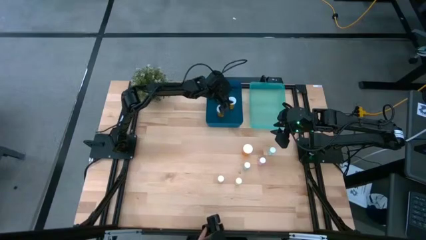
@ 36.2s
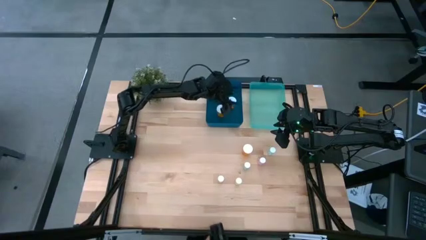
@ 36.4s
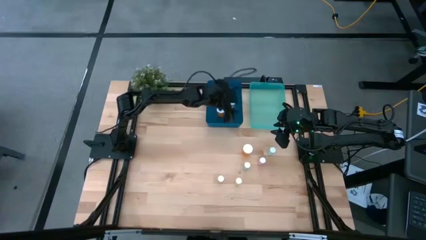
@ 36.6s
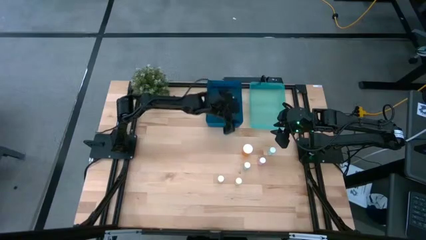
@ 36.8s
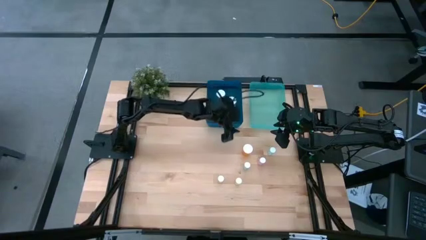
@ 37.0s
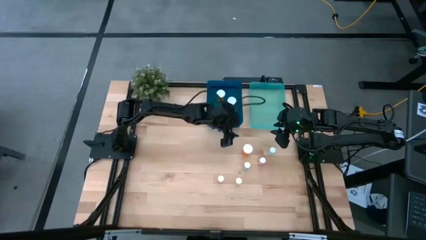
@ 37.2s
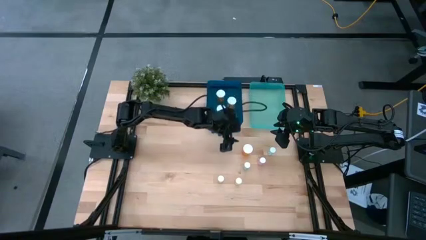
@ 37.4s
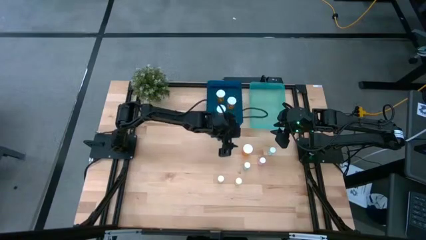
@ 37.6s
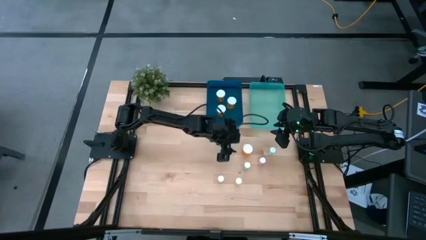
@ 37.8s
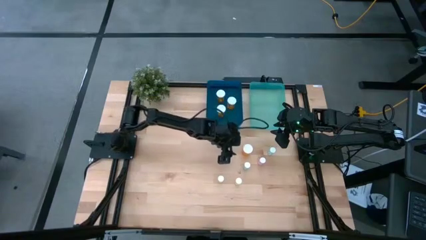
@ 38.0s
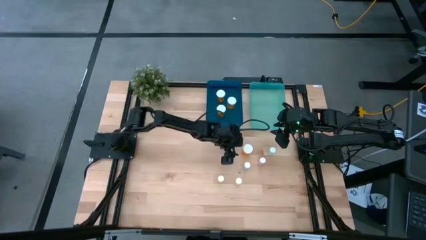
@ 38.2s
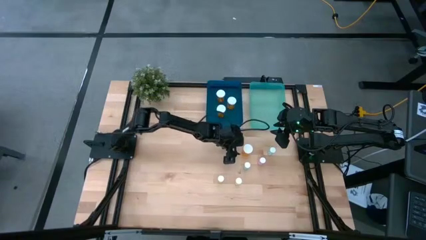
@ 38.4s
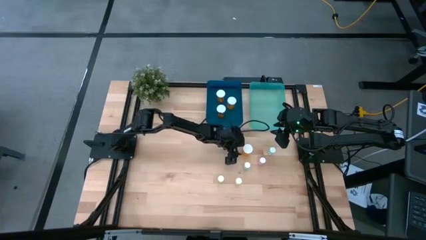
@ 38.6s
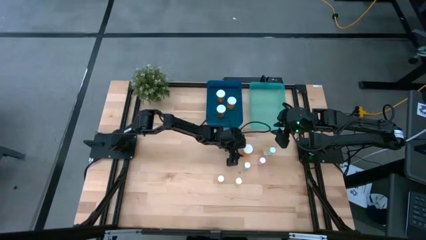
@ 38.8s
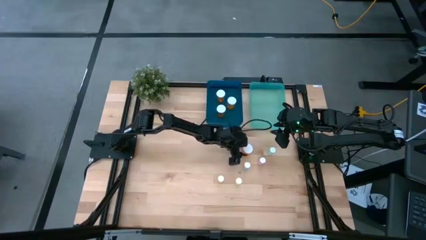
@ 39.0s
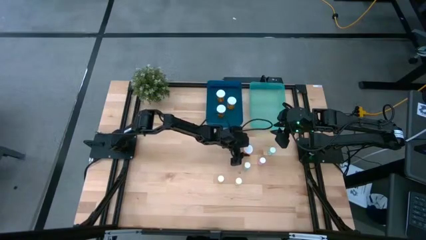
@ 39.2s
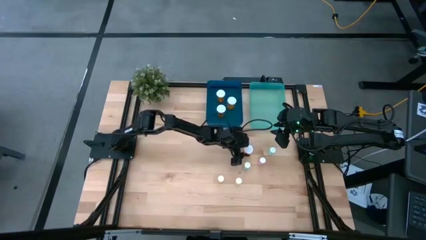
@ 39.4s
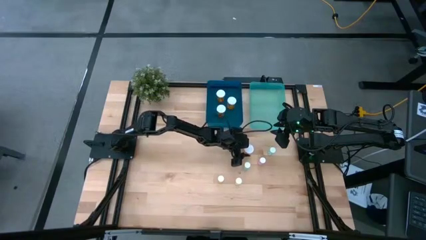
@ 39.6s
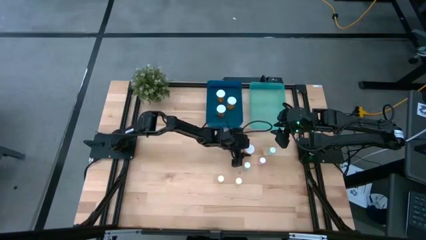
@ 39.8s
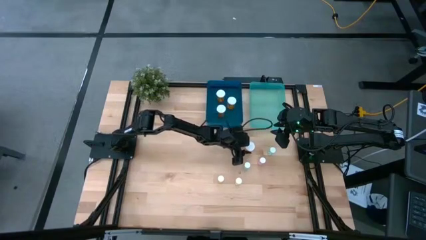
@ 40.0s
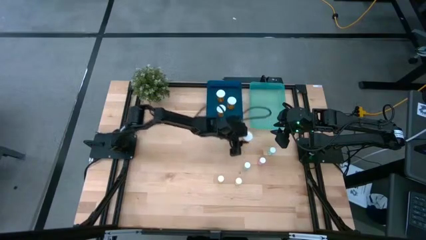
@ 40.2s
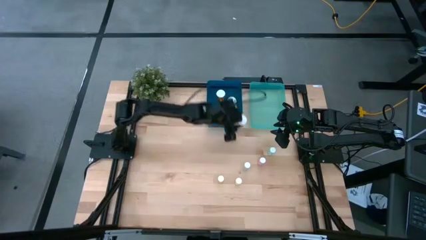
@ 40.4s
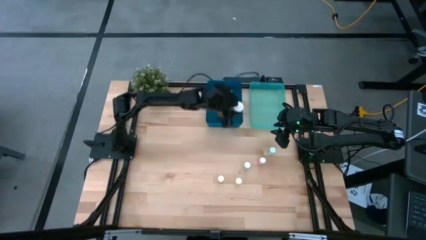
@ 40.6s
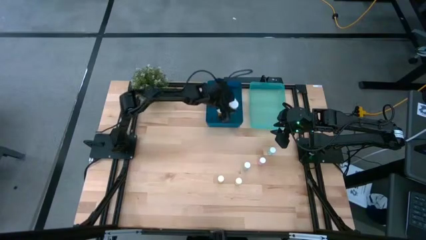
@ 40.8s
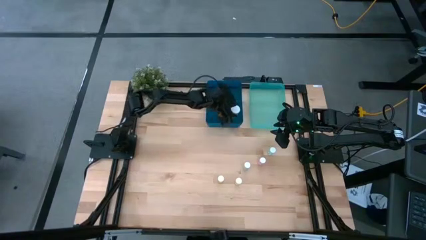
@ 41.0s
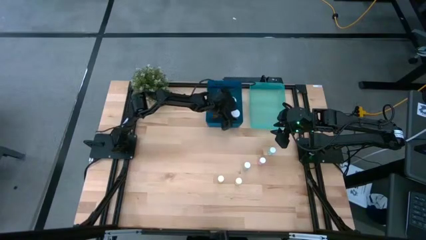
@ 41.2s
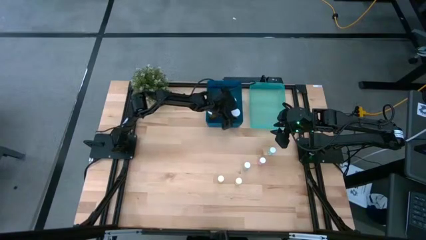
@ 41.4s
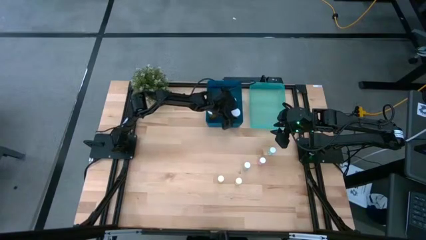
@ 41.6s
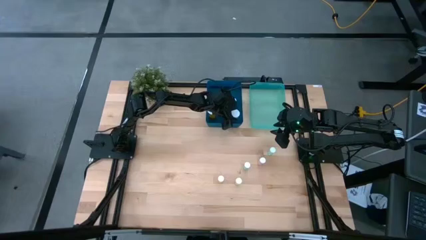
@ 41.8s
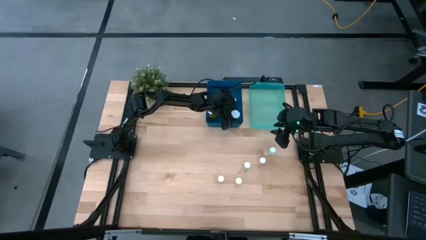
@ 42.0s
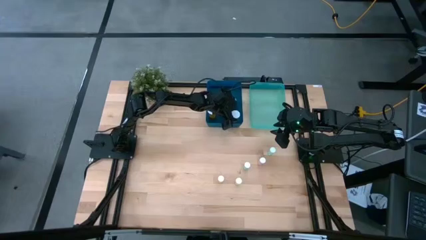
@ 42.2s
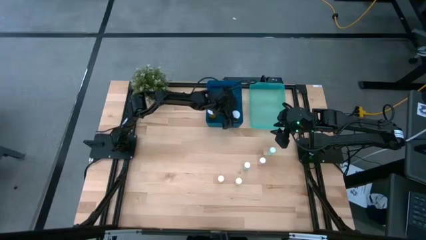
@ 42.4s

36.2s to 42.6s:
Task: Pick and place medicine bottles into bin by pill shape (circle, oval)
Put the large orange medicine bottle into the blue bin

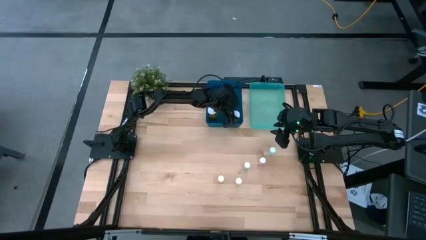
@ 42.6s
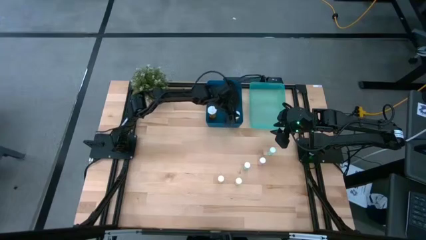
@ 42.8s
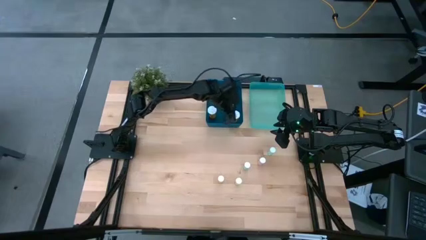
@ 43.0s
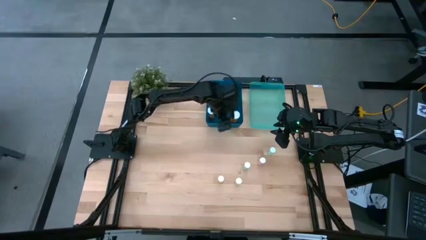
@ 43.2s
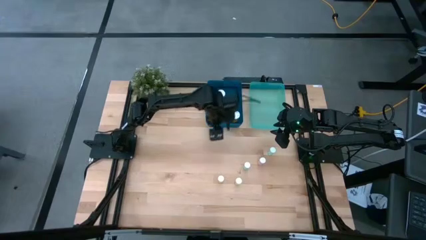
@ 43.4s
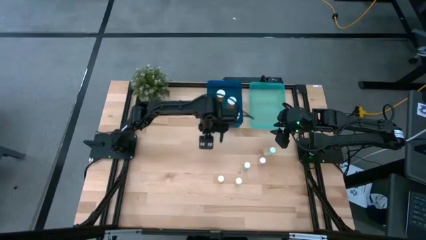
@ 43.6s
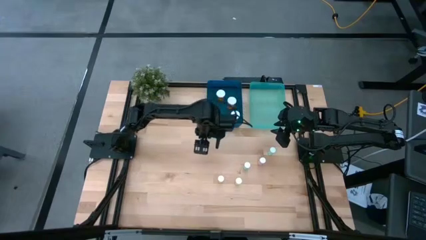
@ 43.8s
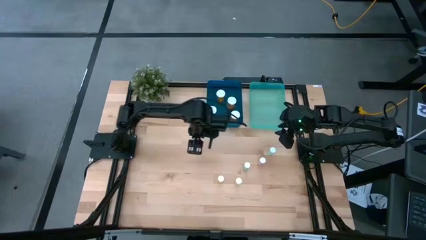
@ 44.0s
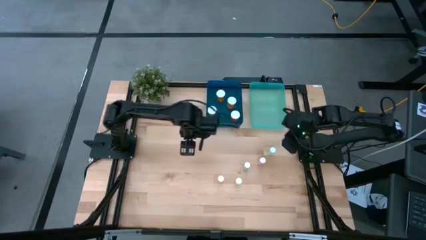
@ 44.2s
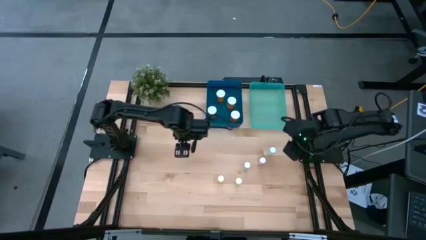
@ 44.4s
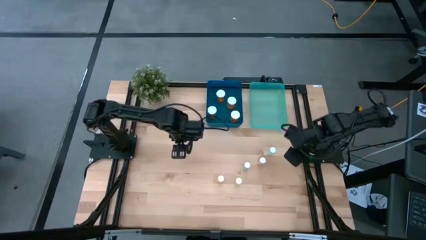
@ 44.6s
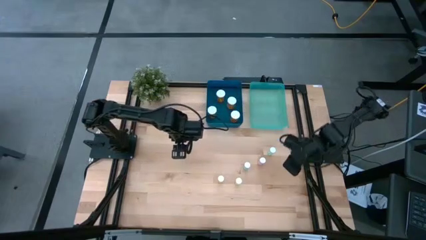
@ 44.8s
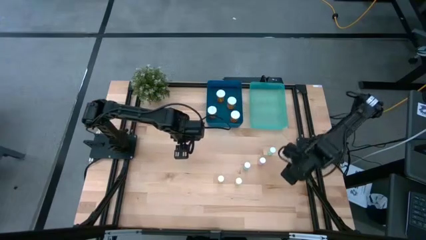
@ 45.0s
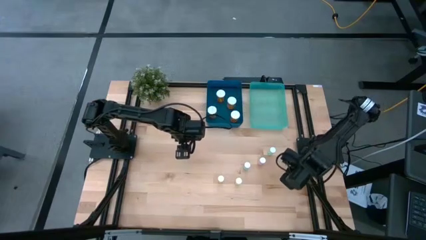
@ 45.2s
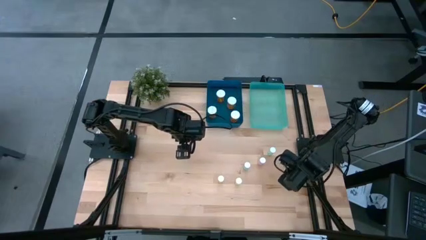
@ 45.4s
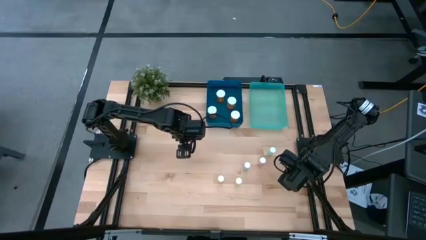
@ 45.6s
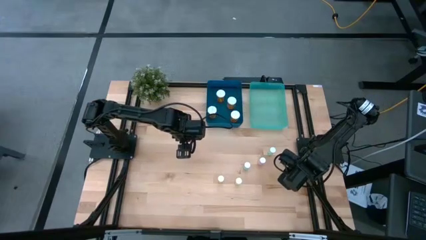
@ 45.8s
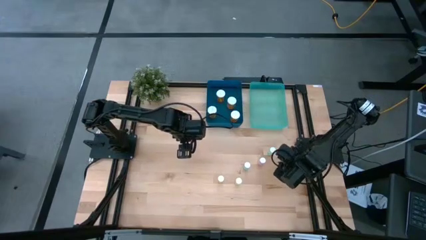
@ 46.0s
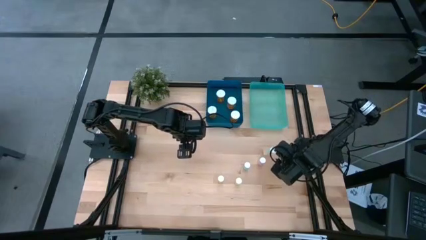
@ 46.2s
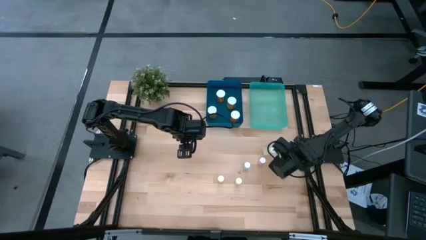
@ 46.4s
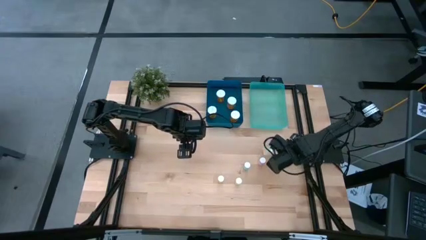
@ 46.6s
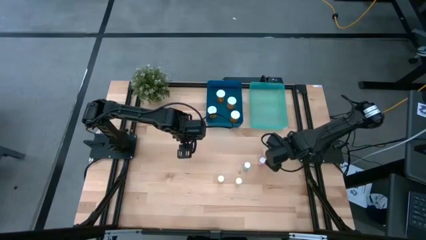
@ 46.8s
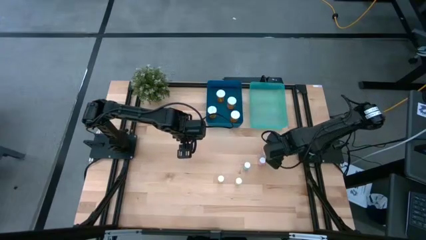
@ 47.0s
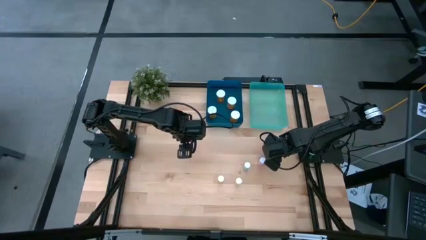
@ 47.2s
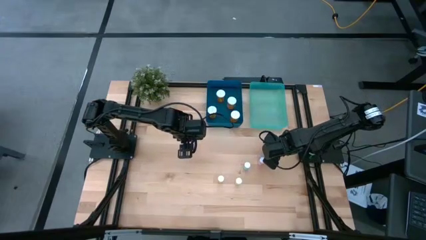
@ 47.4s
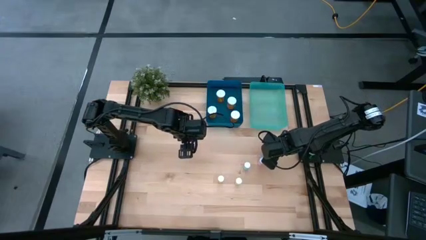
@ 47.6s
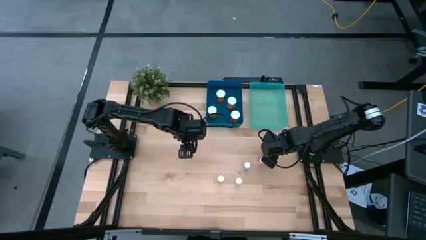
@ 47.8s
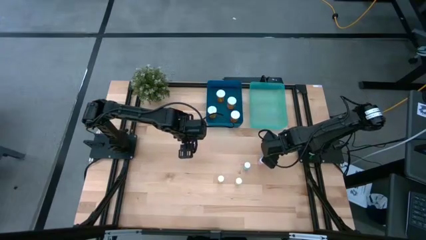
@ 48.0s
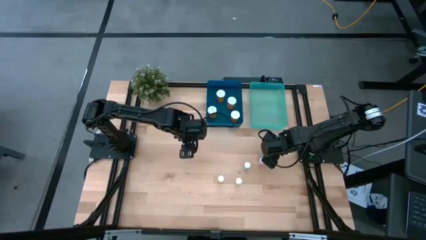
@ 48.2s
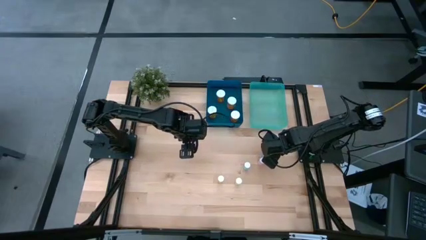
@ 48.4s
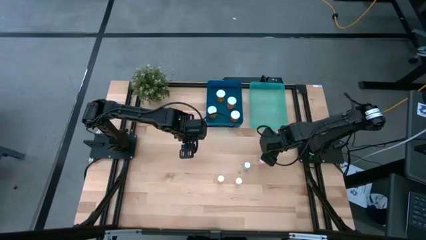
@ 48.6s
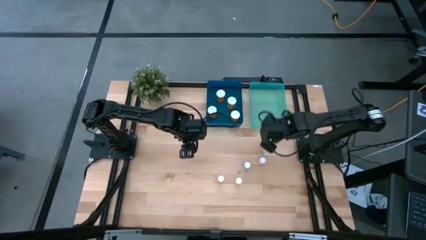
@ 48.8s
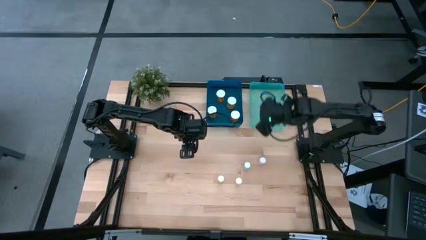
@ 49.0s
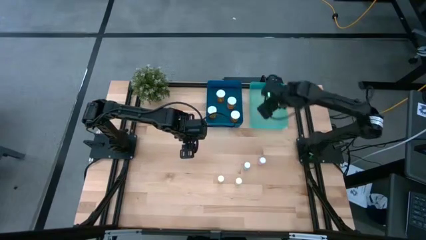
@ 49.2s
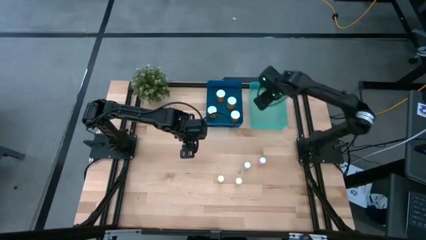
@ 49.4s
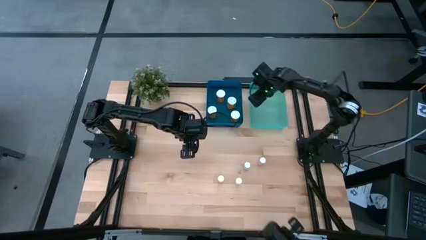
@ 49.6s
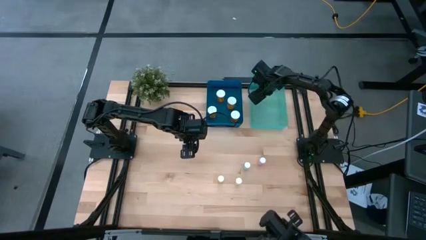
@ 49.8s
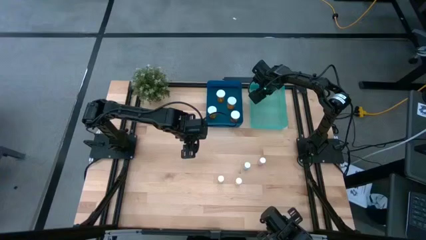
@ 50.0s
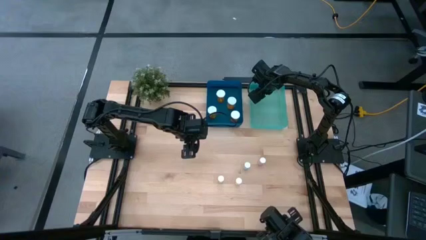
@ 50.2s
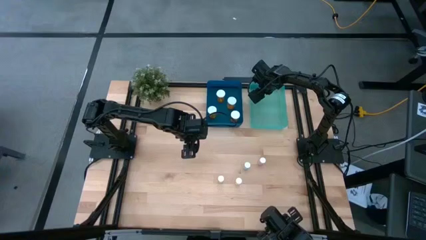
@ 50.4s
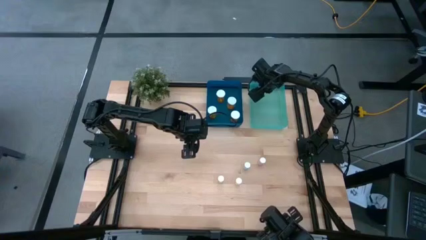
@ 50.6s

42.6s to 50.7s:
Put the small green medicine bottle into the green bin
